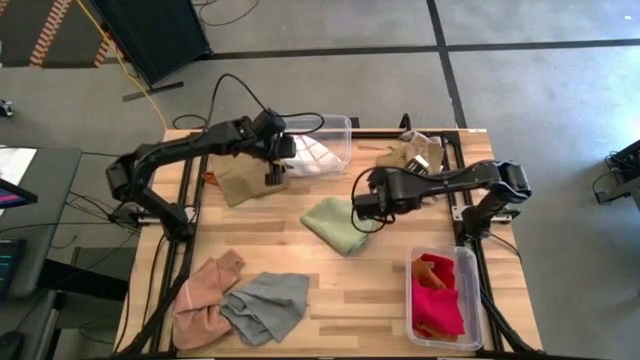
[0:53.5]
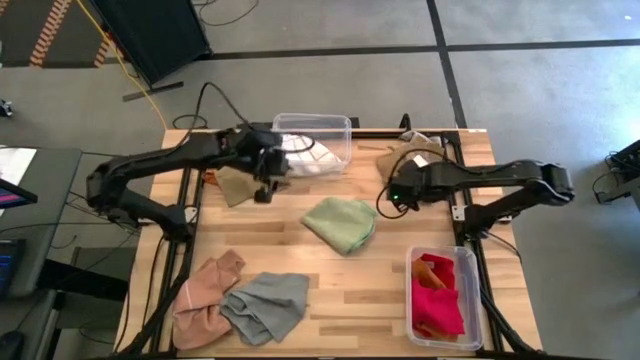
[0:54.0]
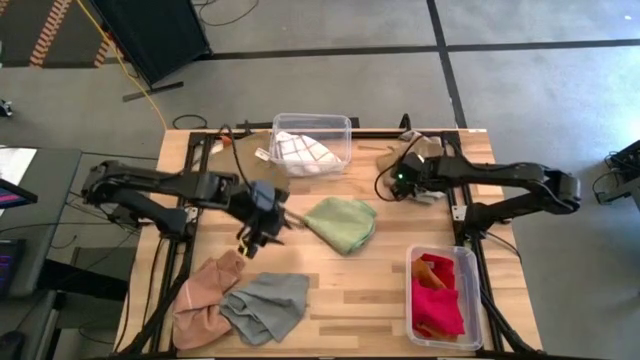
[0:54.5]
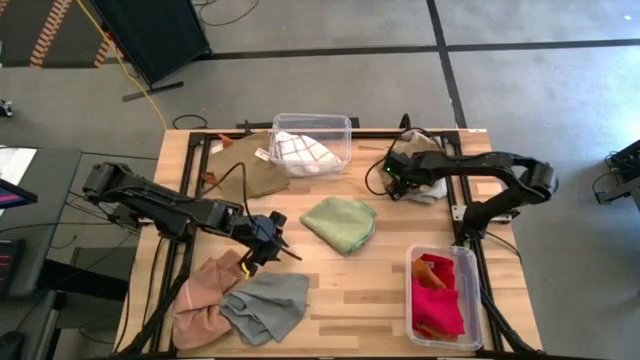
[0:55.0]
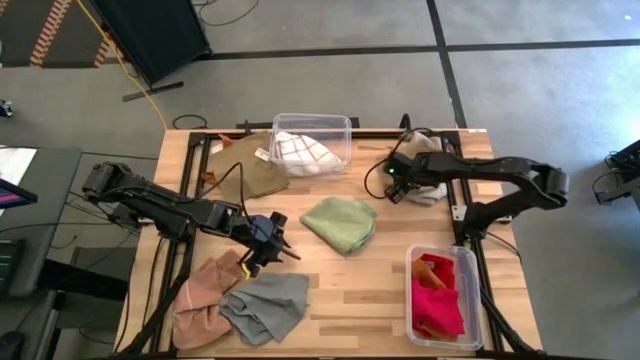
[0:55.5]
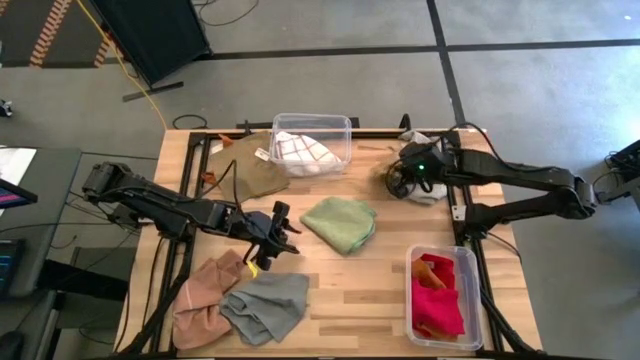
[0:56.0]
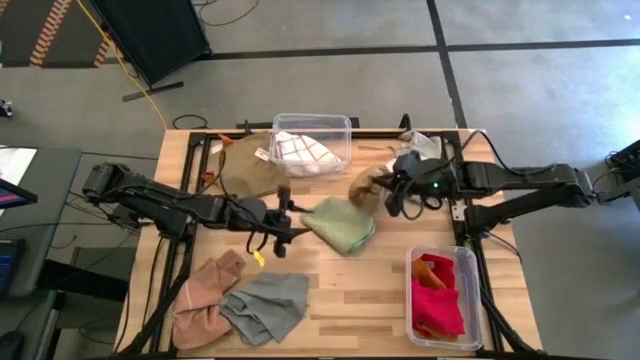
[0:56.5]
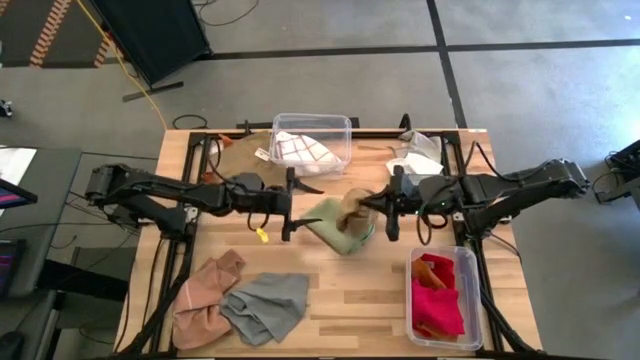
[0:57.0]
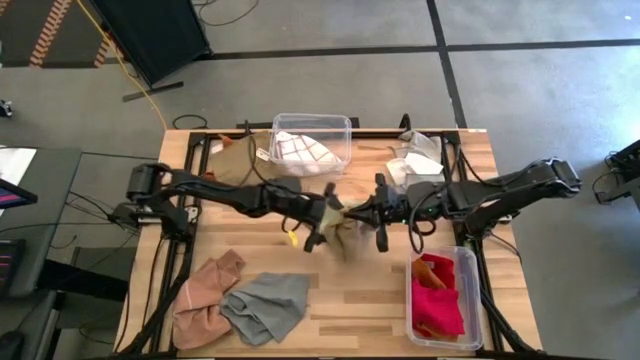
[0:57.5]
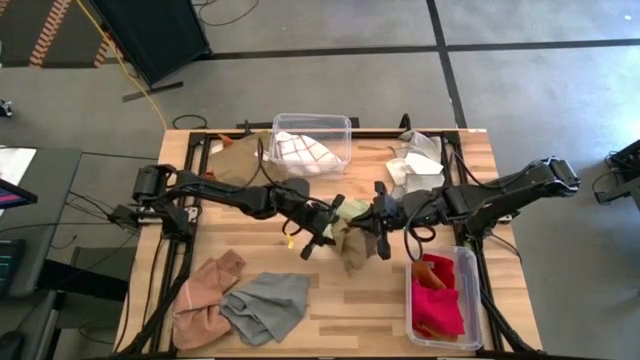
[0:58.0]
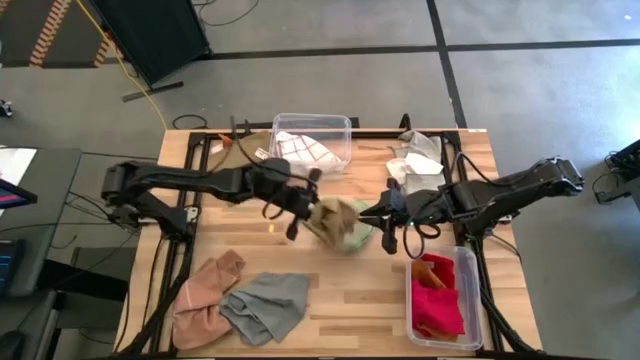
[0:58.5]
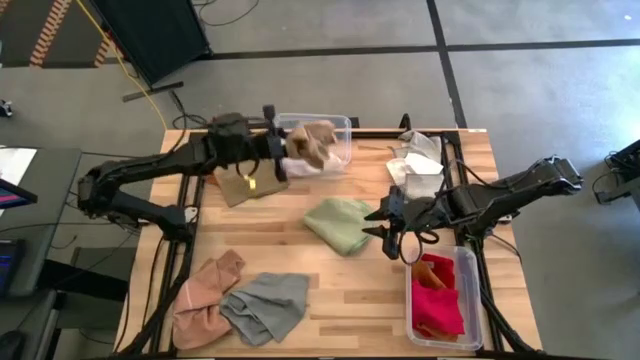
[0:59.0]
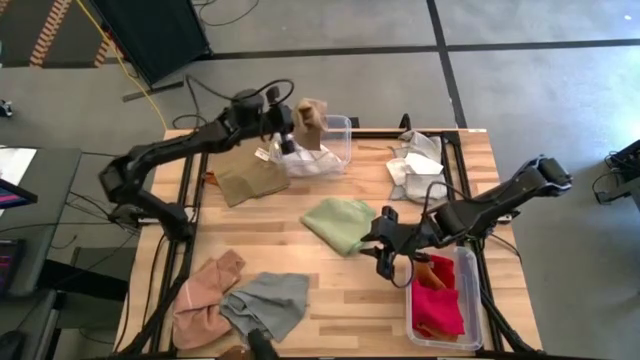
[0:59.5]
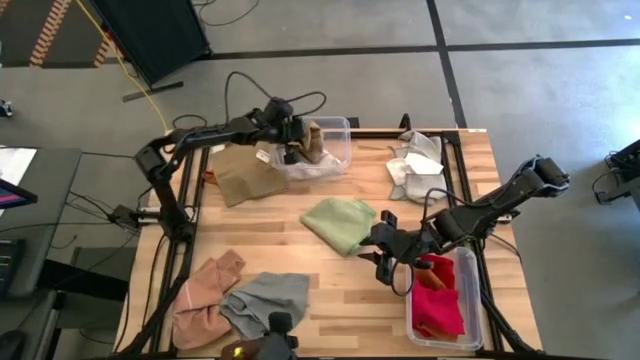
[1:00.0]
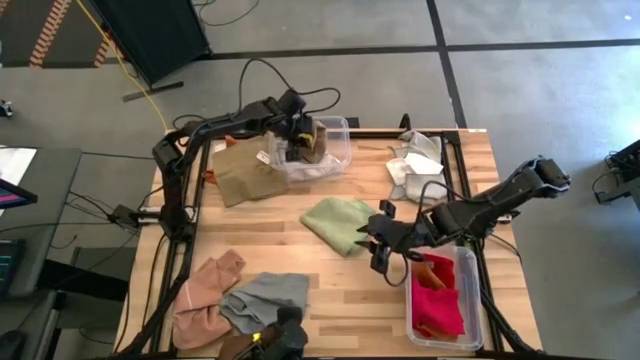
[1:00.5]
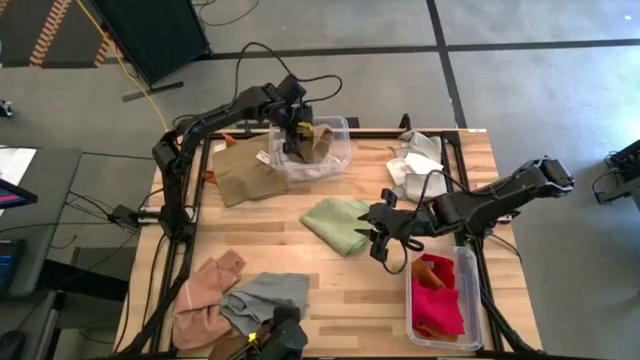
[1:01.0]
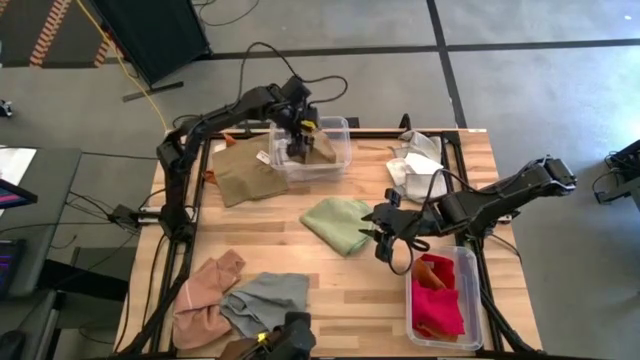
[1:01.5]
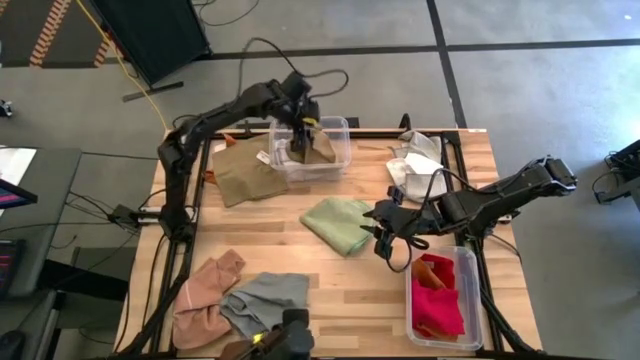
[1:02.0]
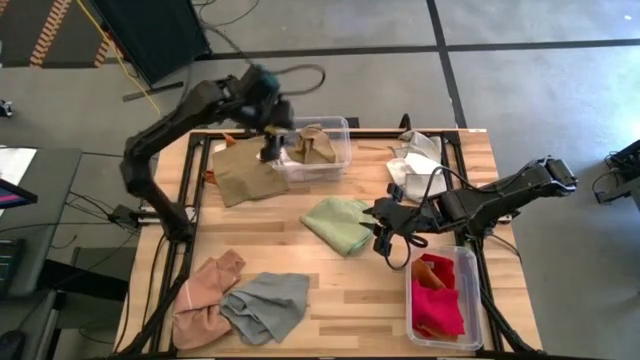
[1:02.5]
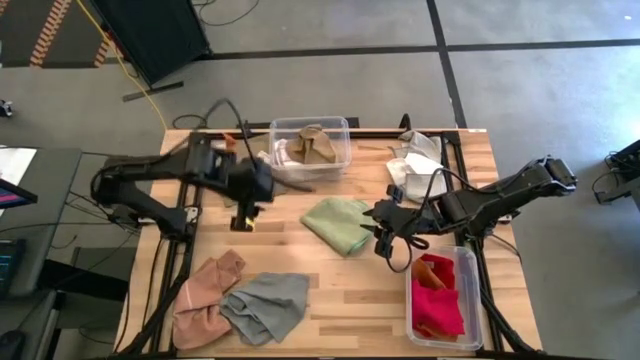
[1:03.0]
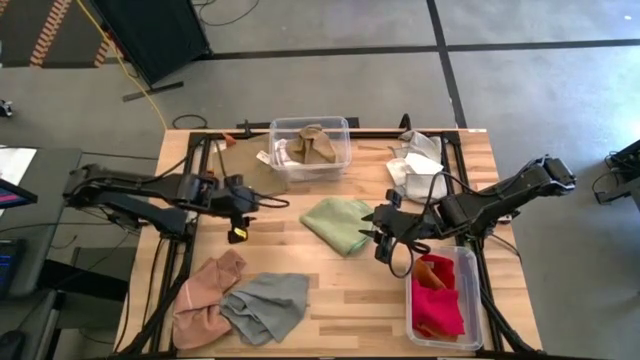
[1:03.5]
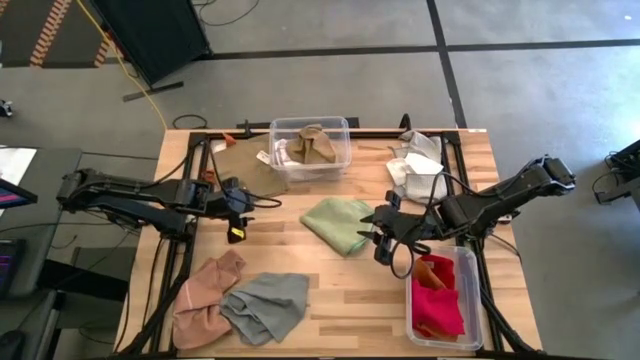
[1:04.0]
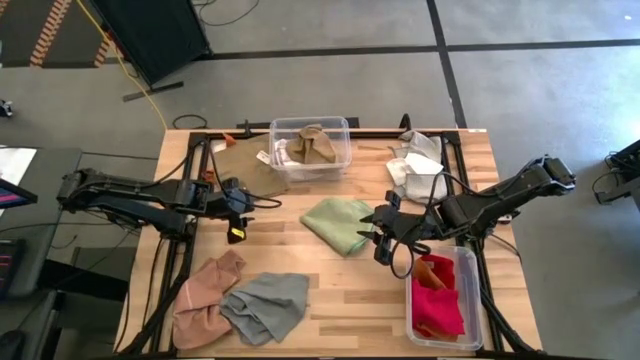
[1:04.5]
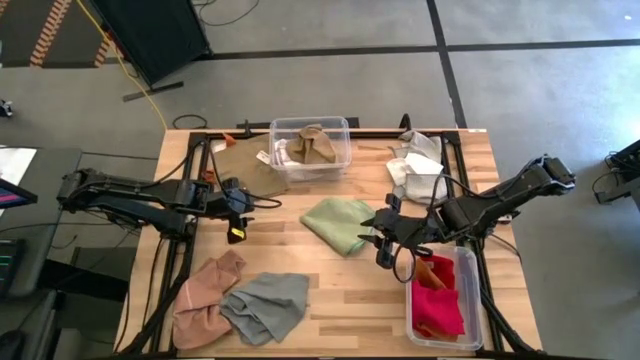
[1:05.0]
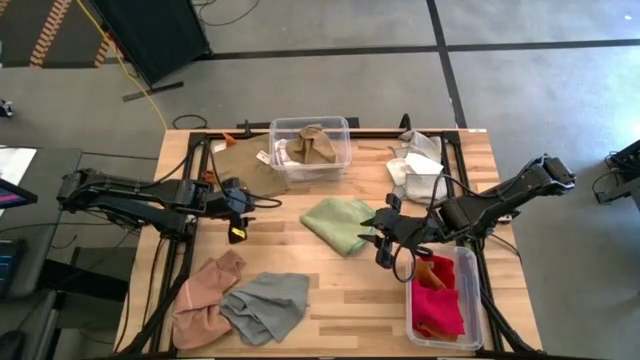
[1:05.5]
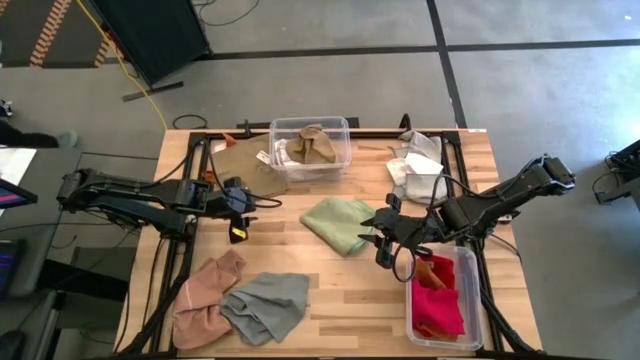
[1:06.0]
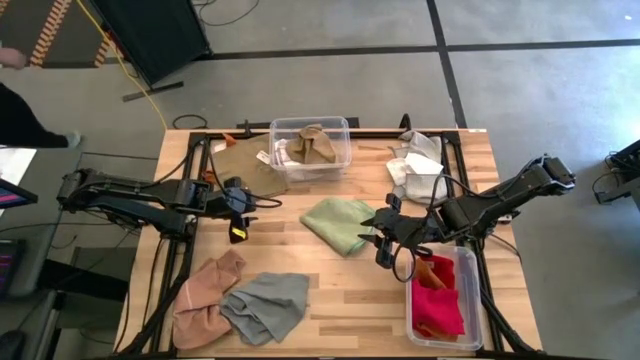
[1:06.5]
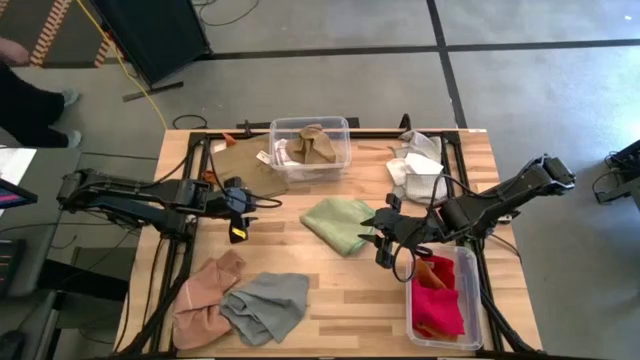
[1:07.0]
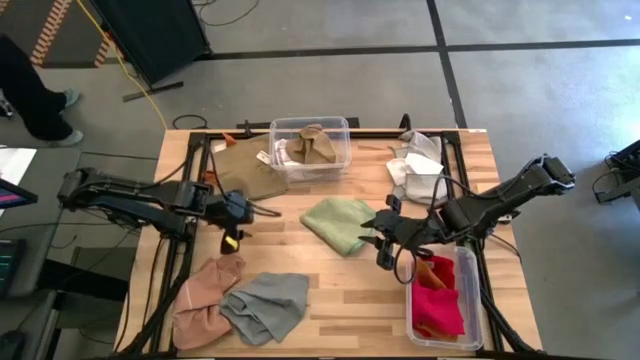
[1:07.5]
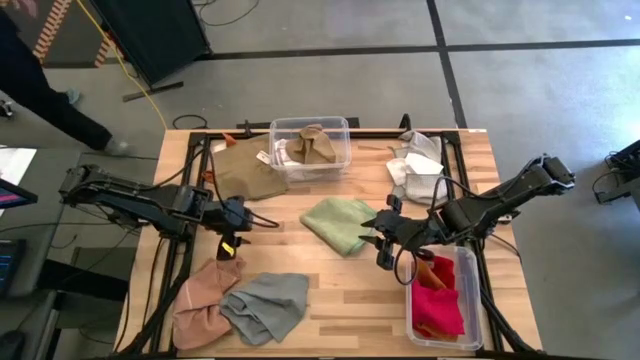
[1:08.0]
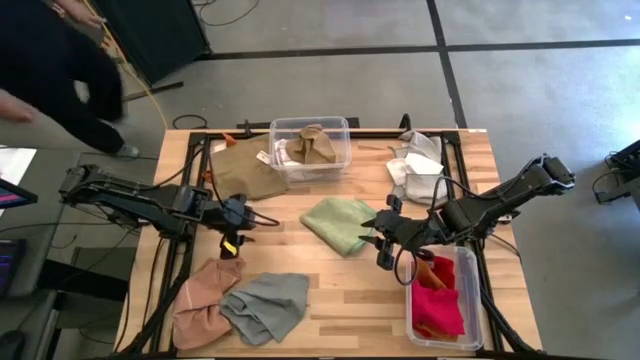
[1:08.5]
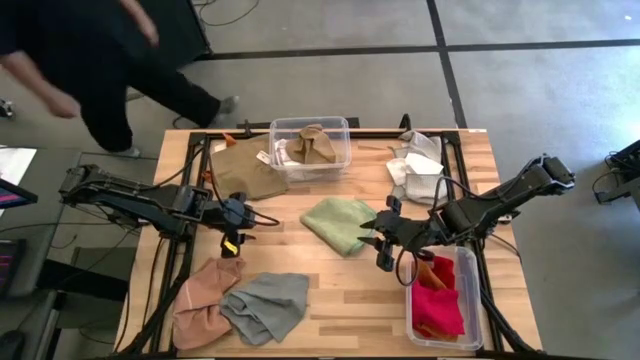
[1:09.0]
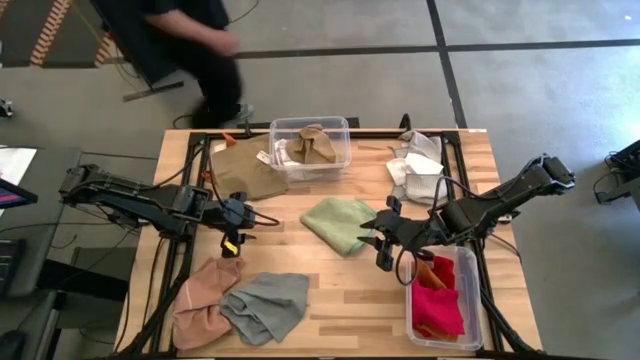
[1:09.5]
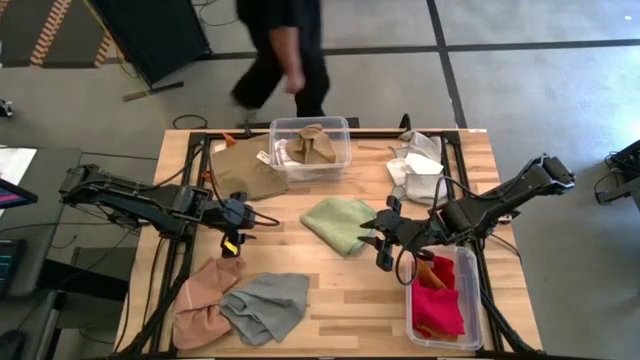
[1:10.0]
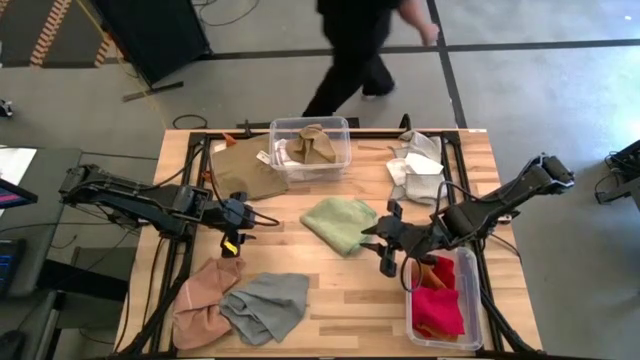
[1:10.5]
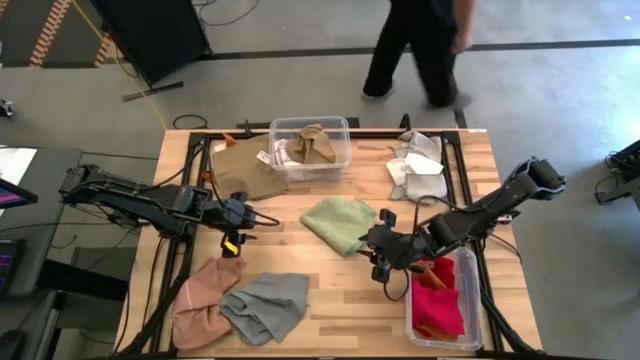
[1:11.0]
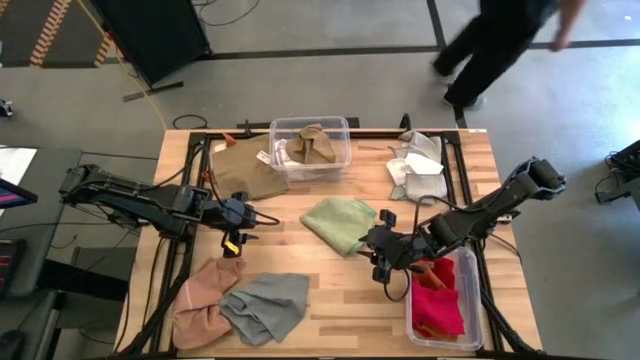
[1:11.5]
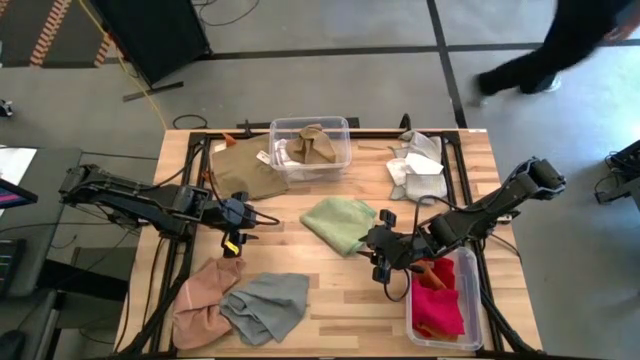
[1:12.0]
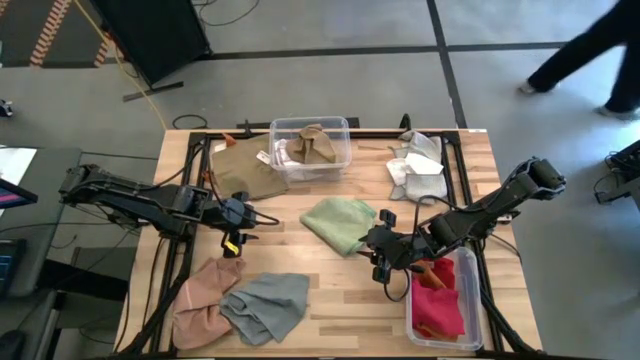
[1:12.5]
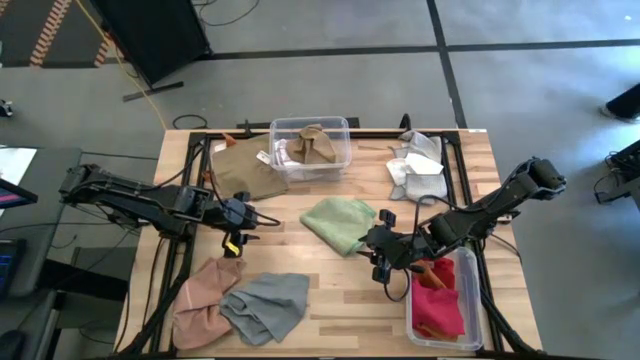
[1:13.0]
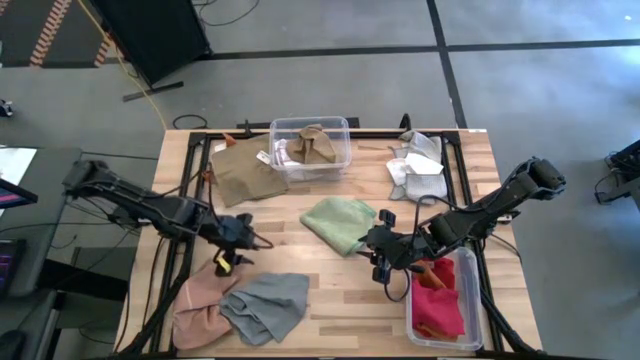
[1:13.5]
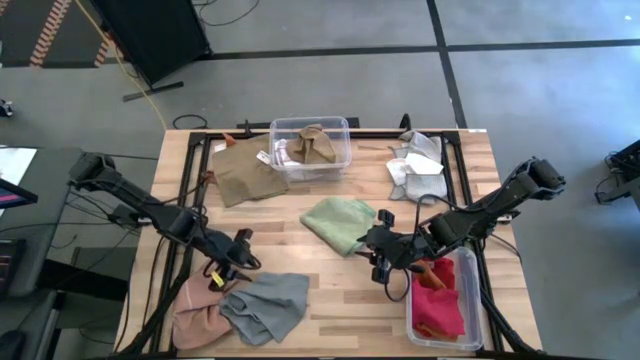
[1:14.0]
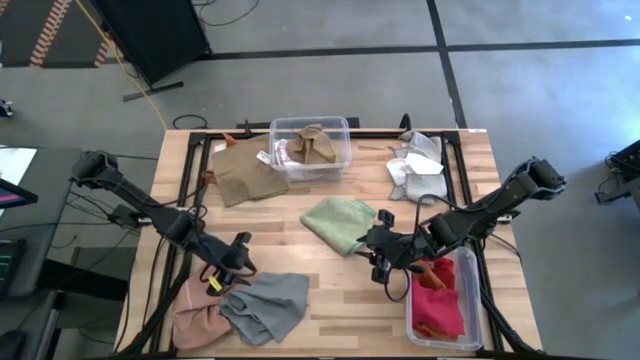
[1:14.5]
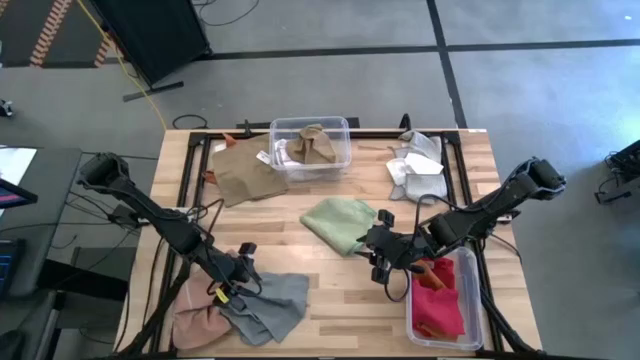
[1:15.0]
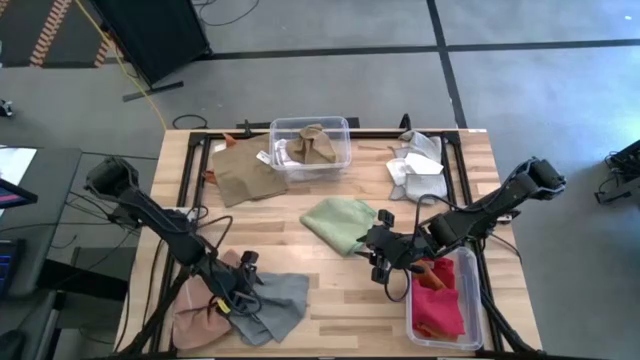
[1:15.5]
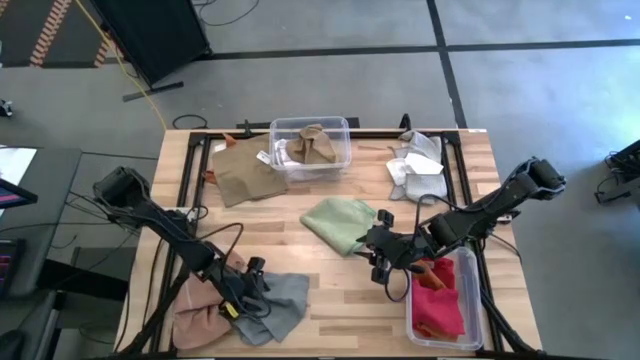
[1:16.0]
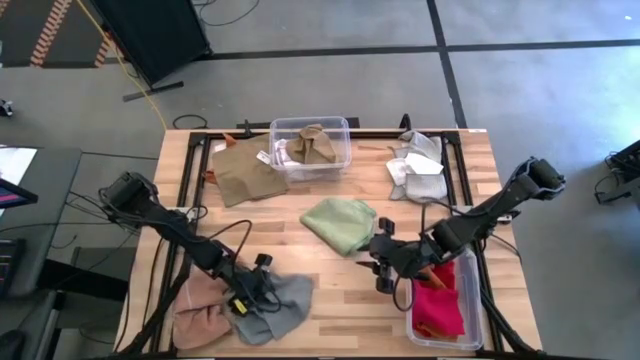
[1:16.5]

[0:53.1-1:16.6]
Task: Sort towels by color in basket
Put the right brown towel into the top transparent bin
